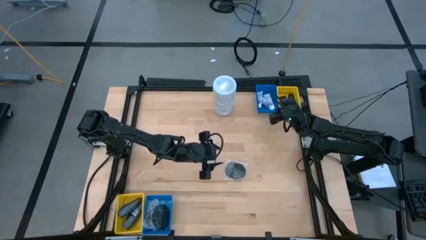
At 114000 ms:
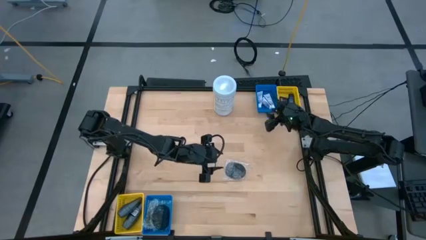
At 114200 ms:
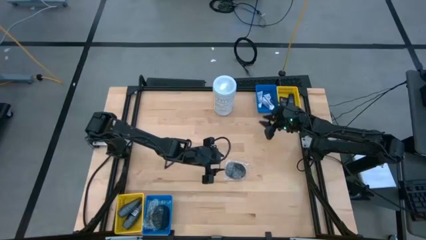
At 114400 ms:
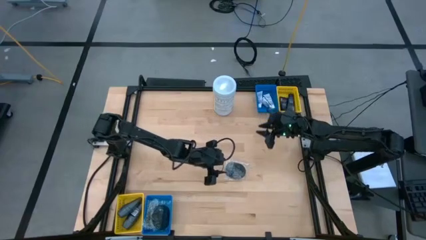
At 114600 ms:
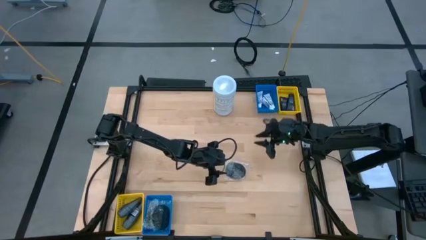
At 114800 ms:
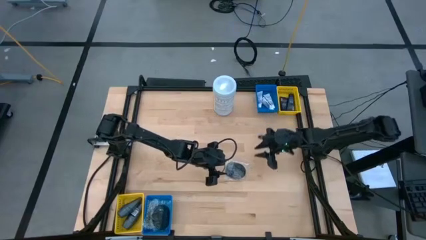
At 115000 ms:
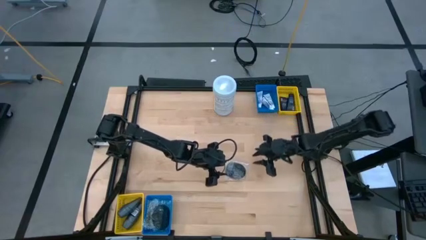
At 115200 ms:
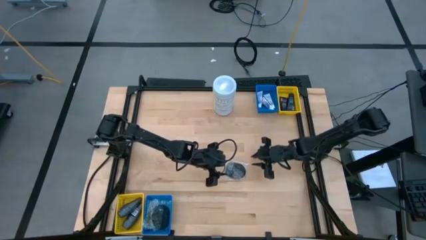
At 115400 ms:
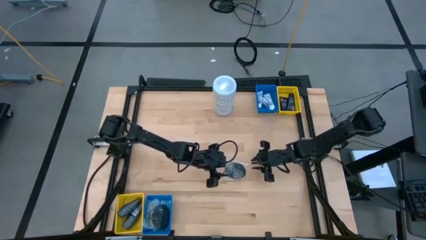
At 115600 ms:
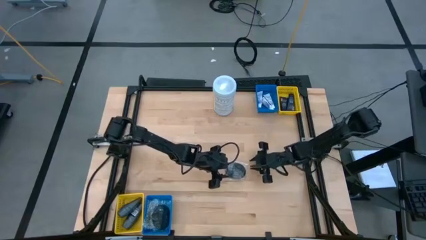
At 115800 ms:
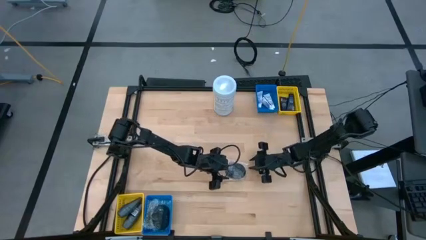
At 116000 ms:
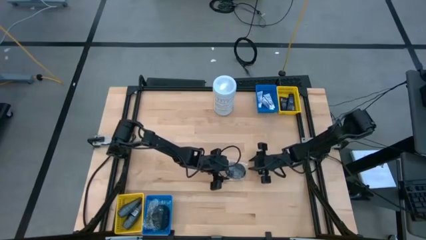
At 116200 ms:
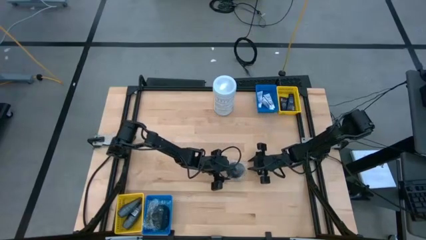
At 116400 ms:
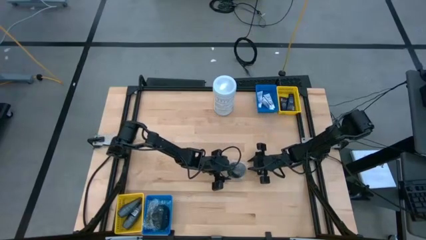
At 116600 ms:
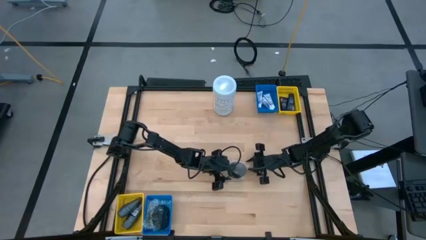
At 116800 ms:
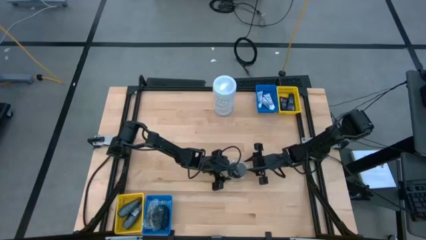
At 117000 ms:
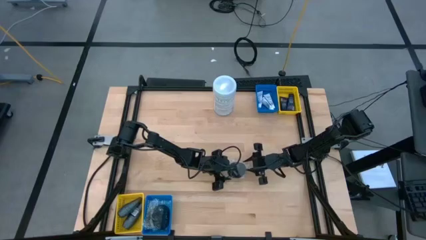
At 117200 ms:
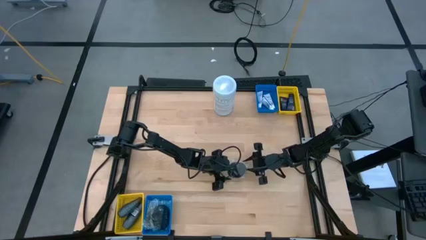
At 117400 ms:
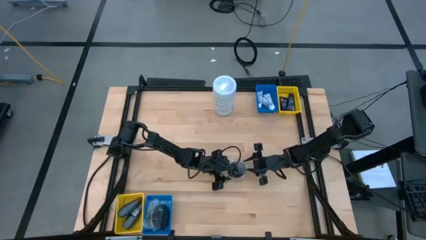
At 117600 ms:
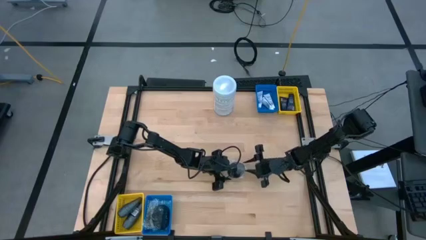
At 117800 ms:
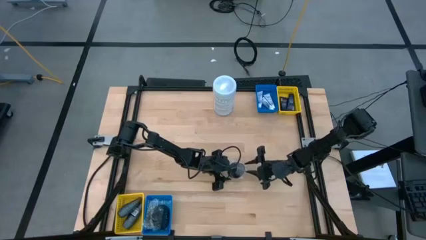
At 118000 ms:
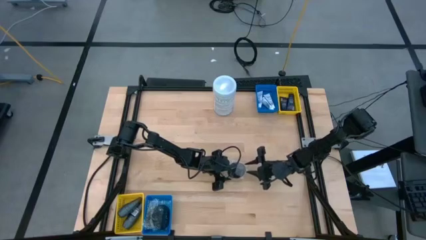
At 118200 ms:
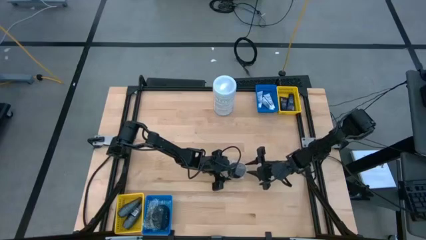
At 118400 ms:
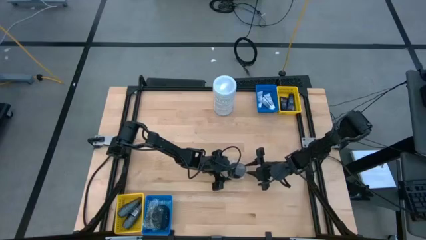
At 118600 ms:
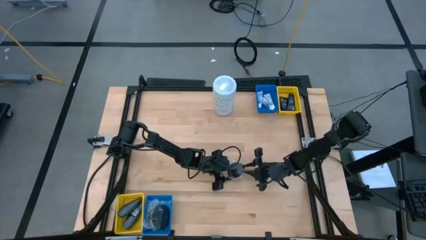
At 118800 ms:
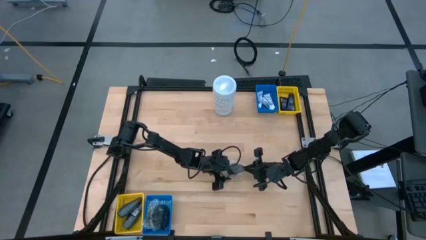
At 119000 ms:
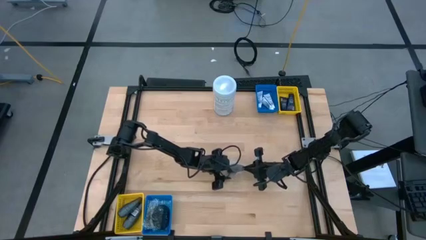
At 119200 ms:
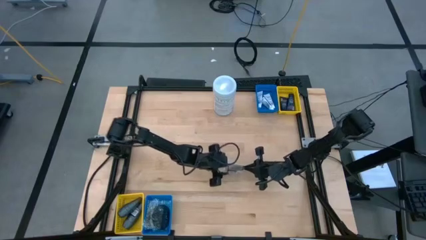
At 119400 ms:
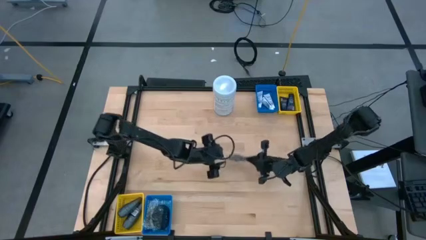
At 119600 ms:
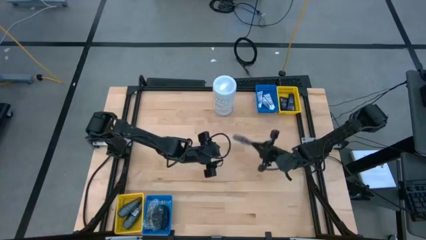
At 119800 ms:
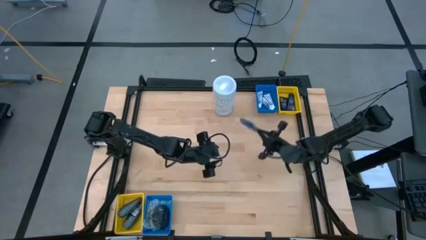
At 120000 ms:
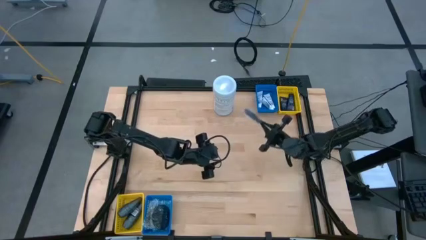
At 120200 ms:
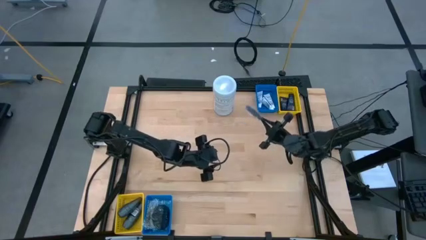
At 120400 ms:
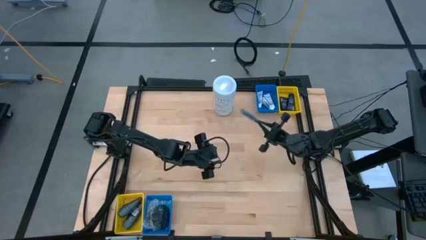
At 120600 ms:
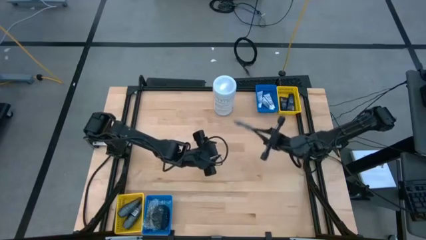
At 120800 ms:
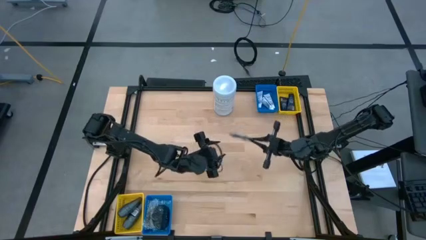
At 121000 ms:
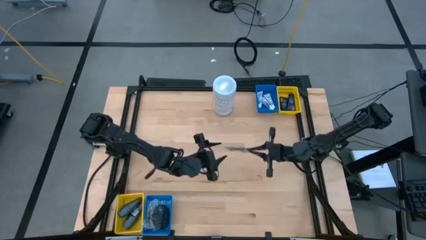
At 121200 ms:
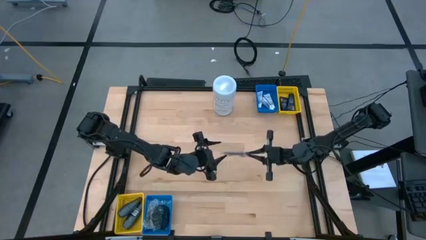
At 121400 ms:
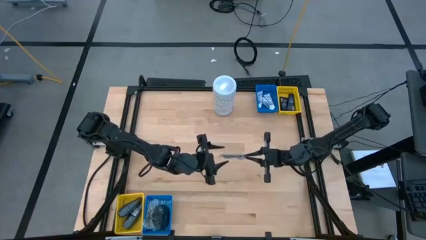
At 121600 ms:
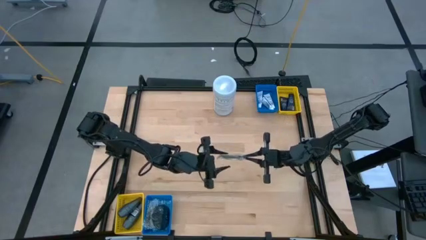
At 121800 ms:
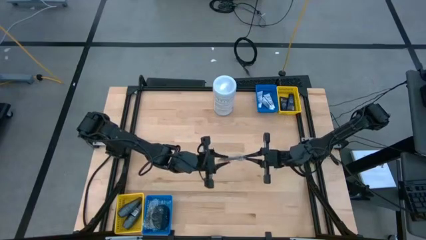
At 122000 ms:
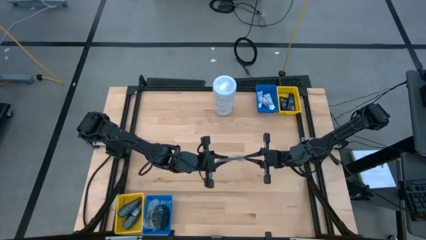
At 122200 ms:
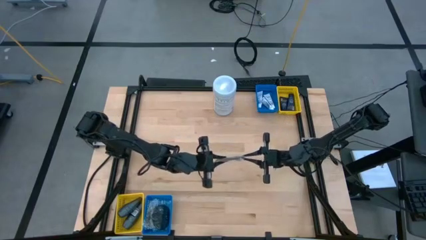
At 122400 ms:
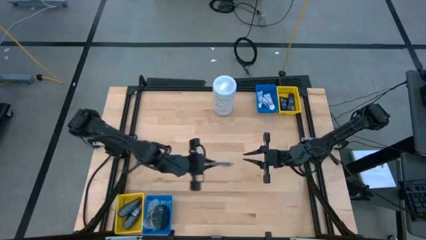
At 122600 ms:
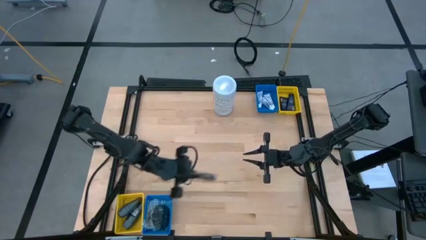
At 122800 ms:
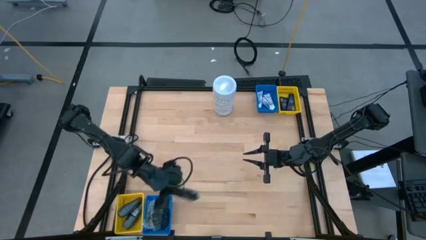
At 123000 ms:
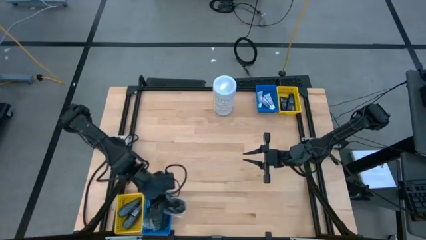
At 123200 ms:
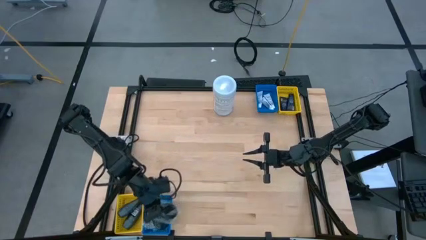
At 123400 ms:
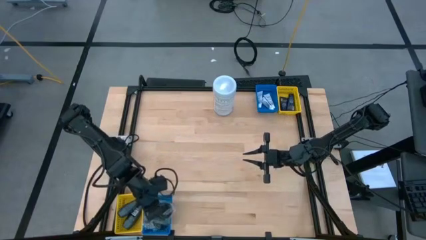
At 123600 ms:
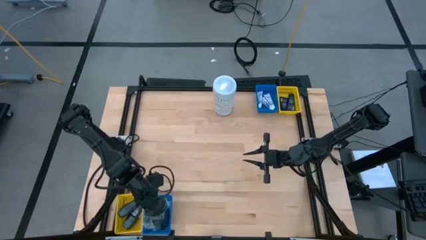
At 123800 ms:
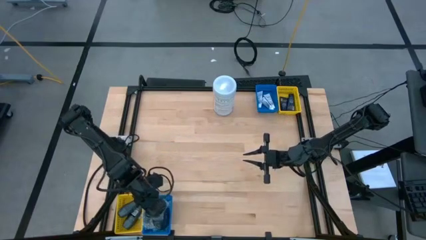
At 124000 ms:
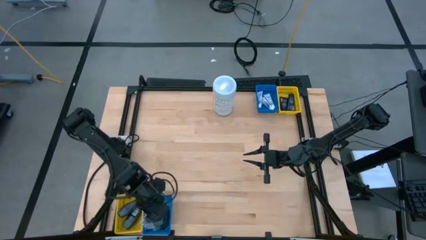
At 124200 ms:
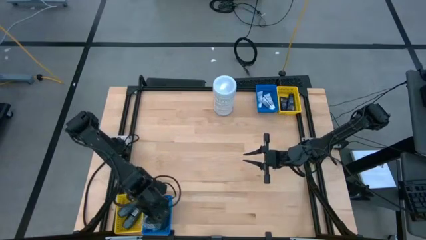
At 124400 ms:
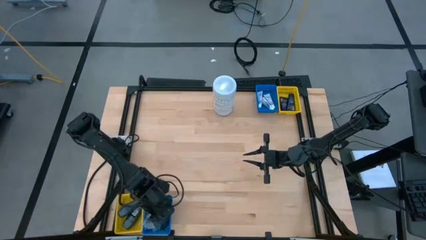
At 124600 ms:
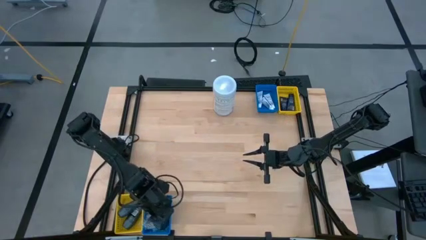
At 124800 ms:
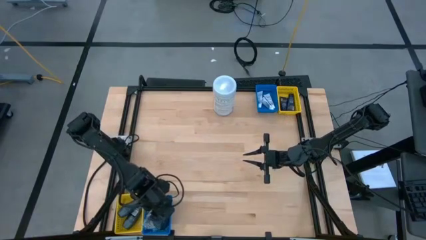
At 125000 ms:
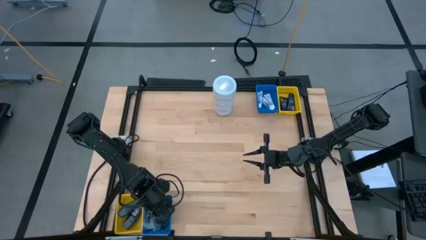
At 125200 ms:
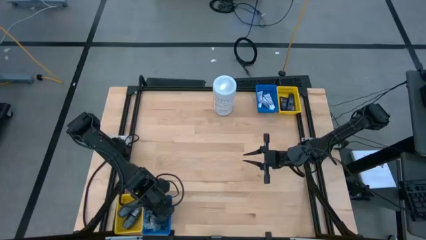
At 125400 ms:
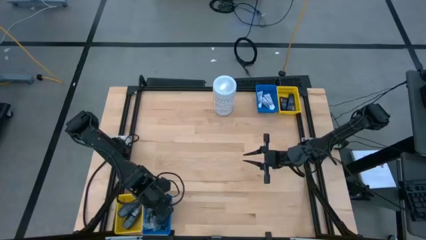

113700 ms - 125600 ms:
Task: Pick & Place Travel size toiletries
Stack the black hairbrush on top of the black hairbrush in the bottom blue bin

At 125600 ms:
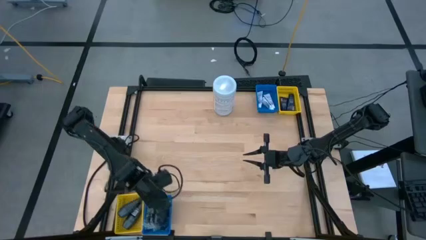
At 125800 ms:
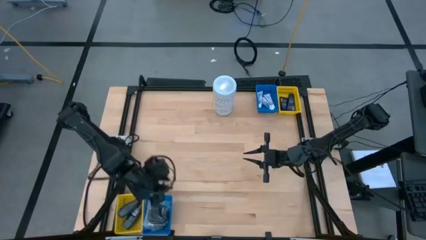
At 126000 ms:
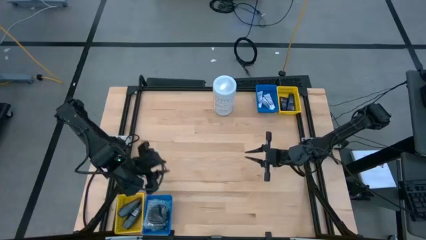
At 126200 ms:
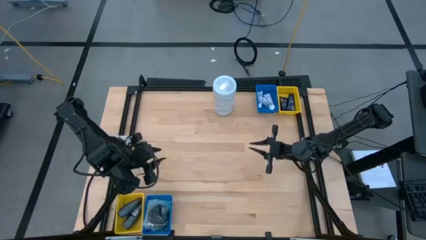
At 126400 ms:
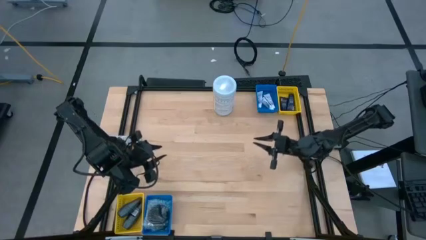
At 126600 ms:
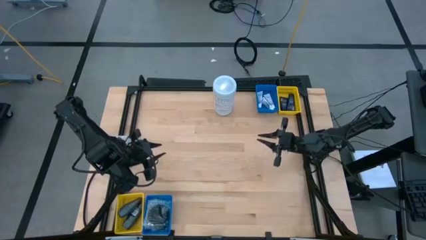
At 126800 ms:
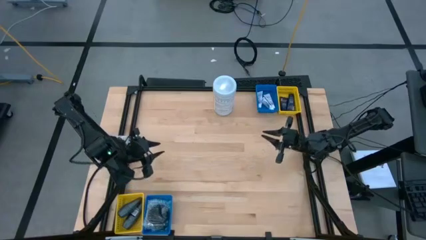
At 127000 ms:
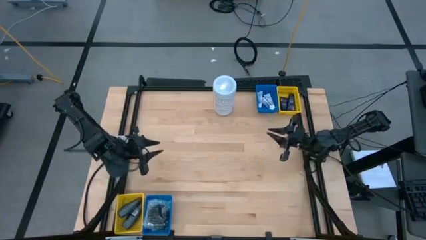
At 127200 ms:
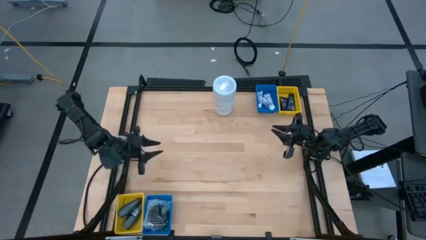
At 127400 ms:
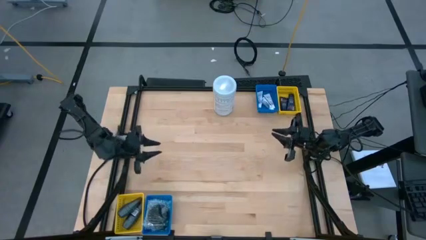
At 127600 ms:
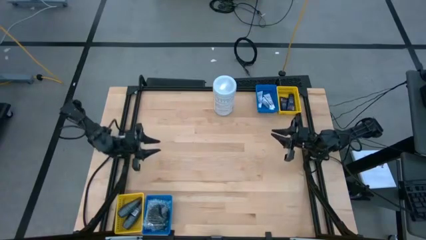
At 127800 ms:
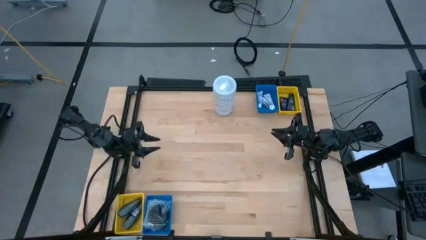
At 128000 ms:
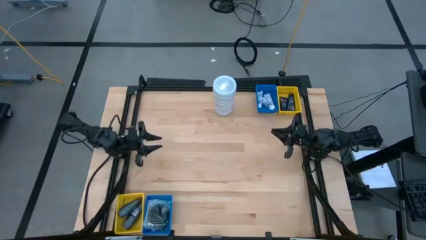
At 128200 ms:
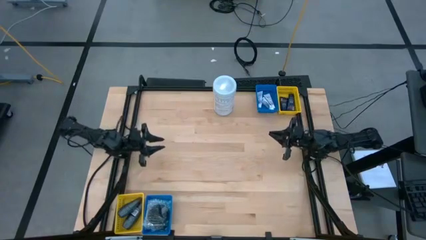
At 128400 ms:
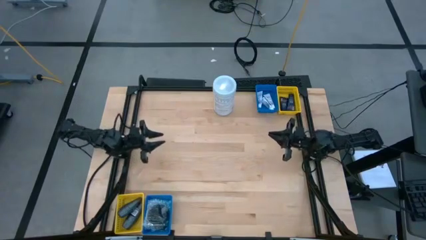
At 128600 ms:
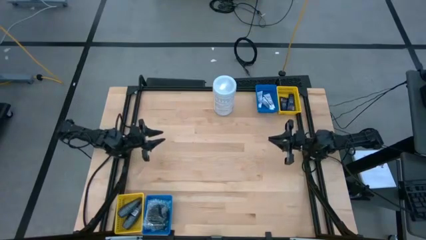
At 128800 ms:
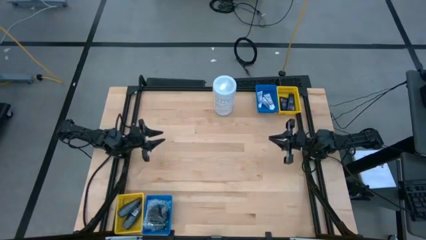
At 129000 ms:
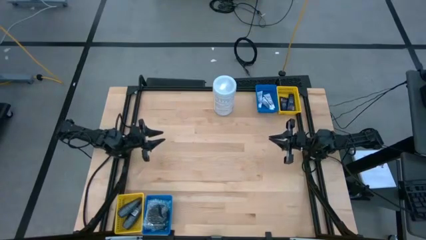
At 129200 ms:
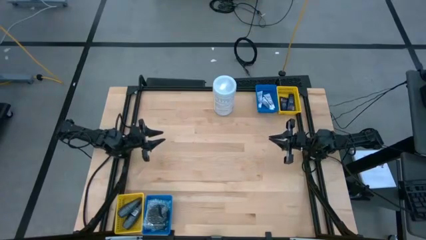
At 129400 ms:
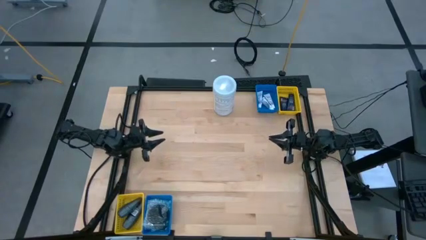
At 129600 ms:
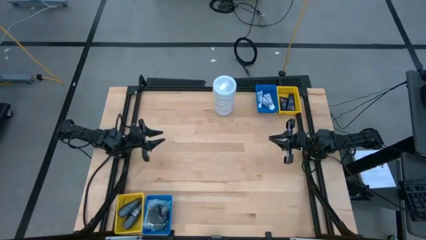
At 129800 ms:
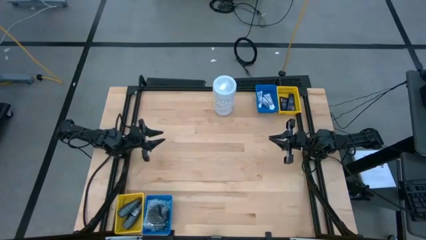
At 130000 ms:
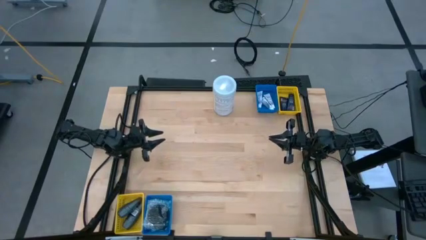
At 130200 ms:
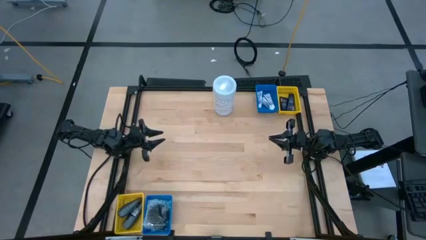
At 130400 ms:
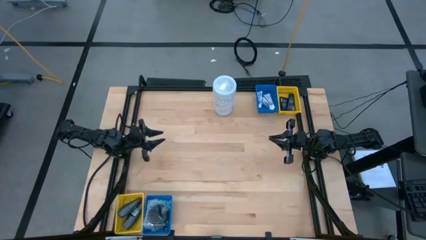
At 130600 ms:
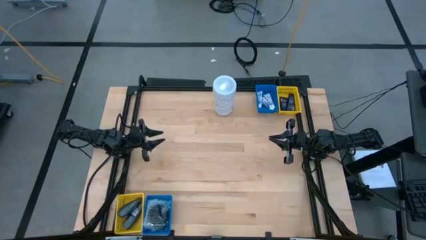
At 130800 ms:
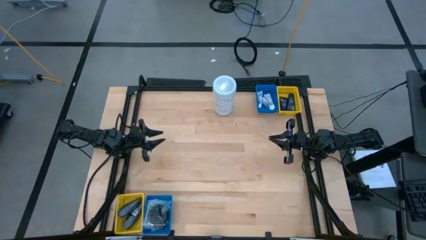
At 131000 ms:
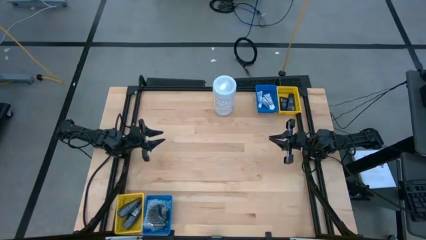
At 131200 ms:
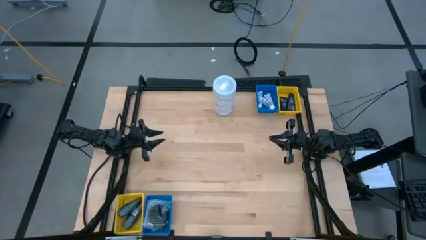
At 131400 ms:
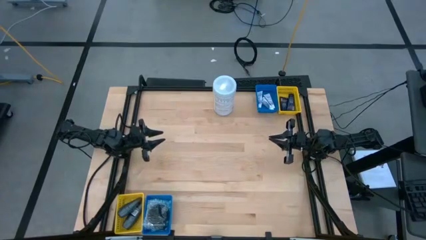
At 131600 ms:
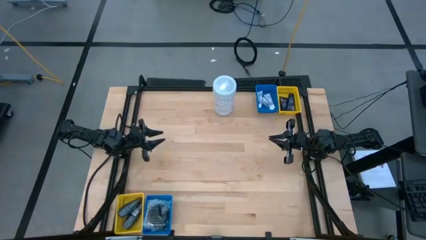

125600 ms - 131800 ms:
Return to Home Position
